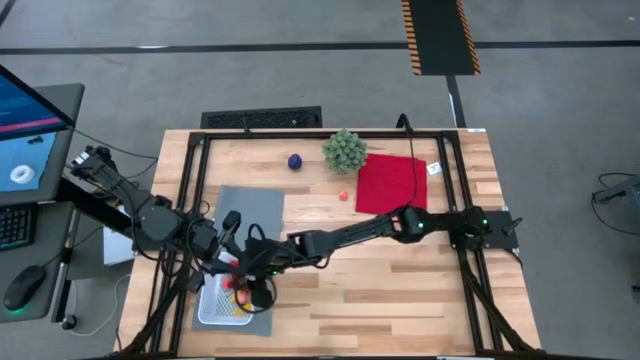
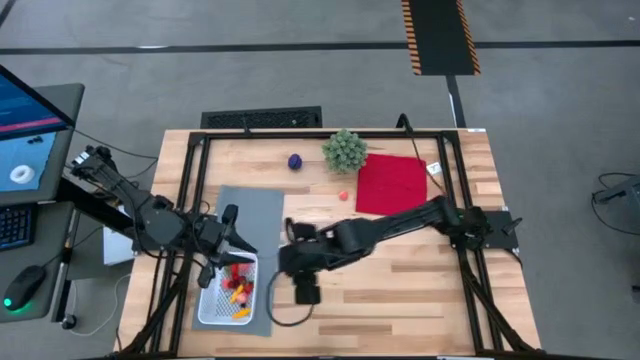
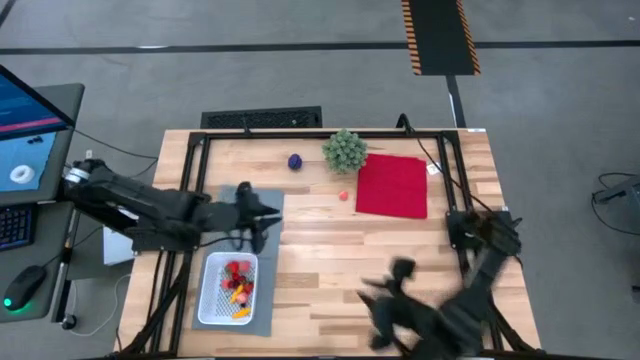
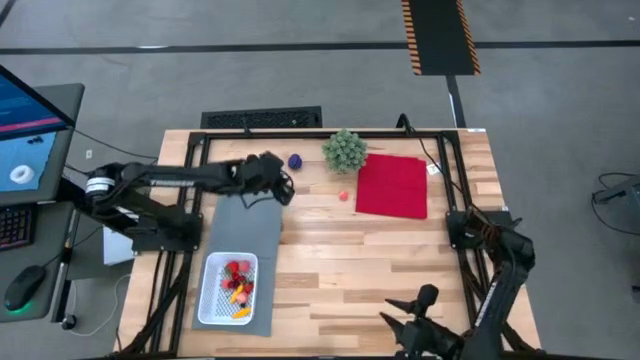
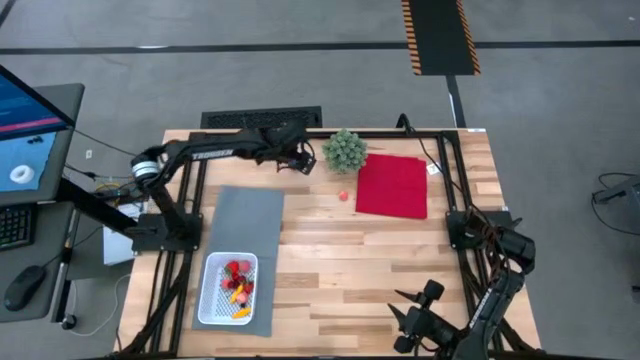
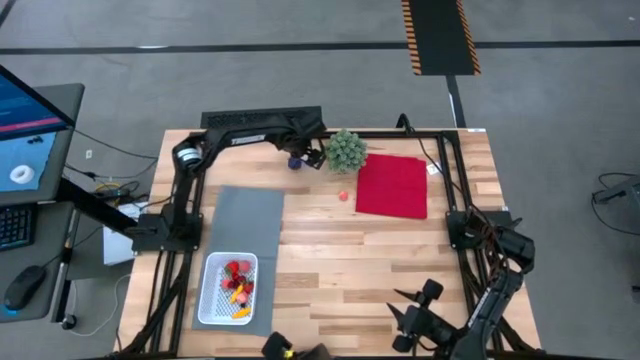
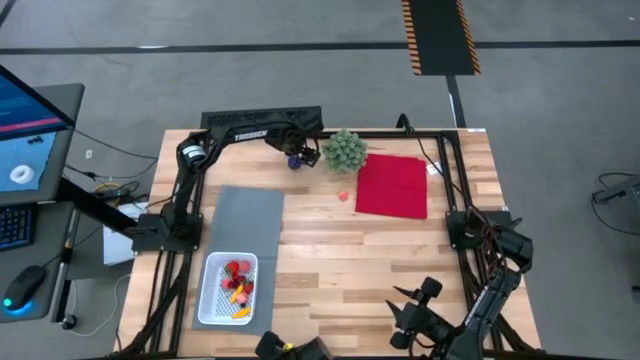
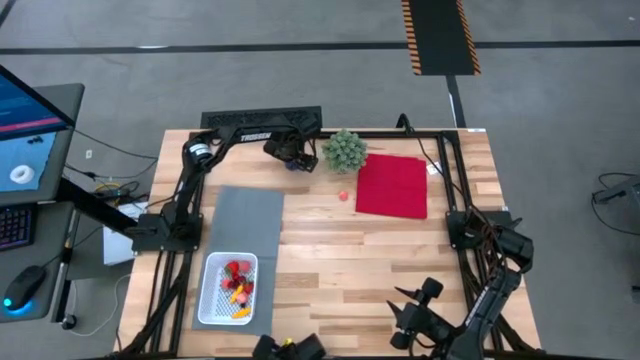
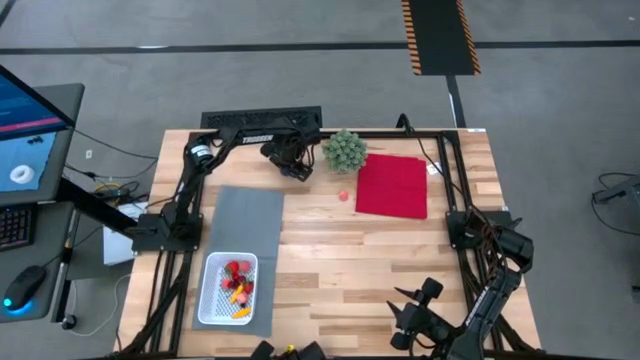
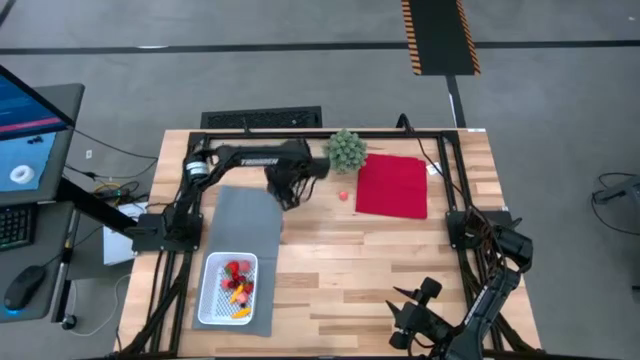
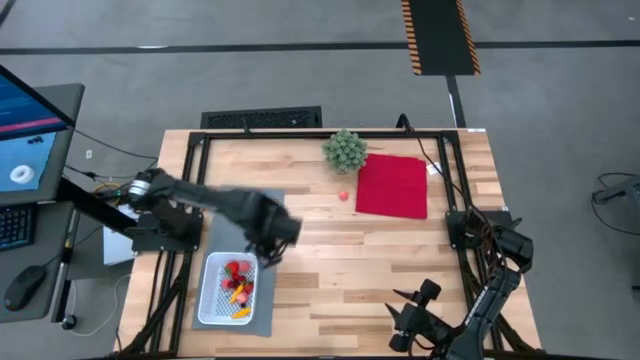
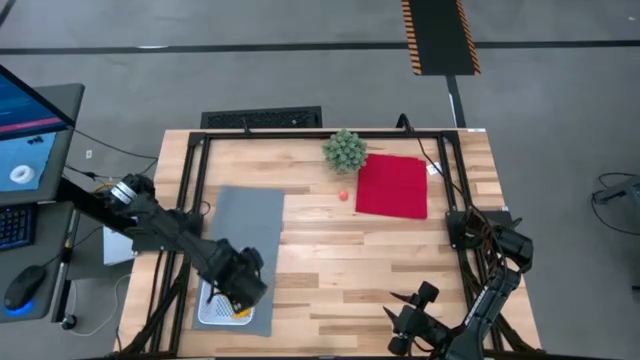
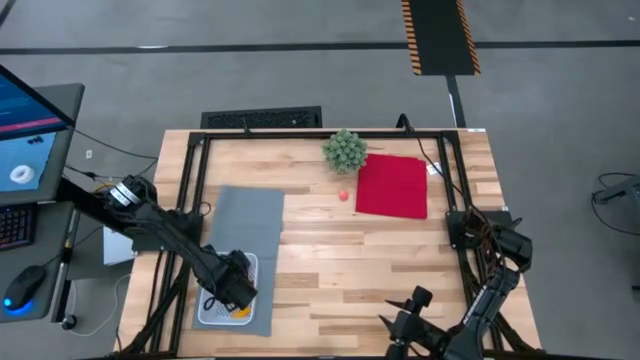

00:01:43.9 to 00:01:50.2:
Task: Pick and placing Produce into tupperware
Put the violet grape into the white basket

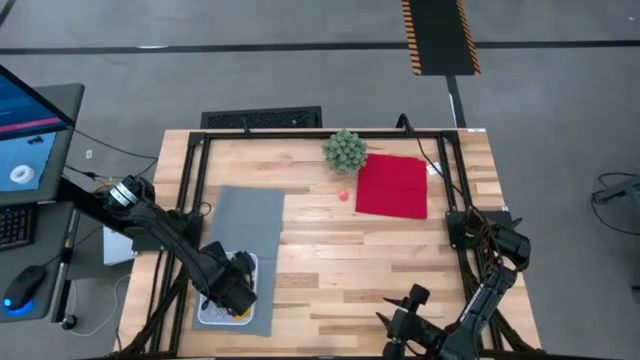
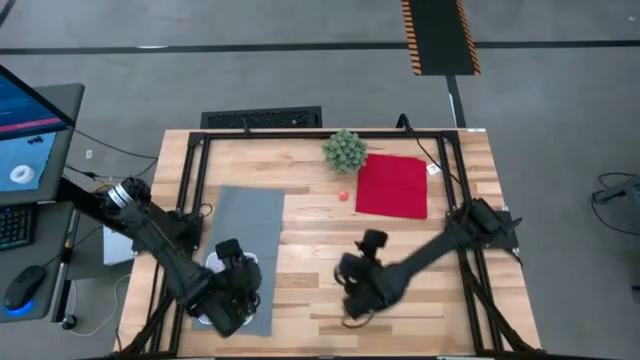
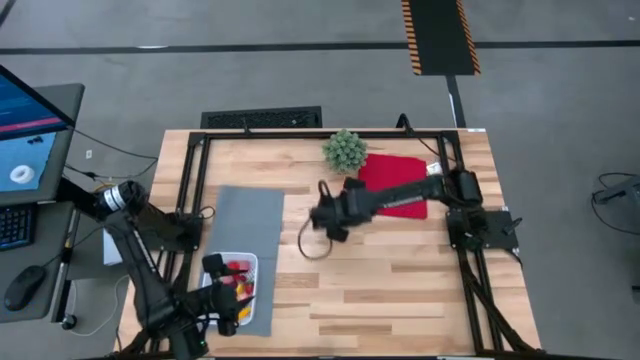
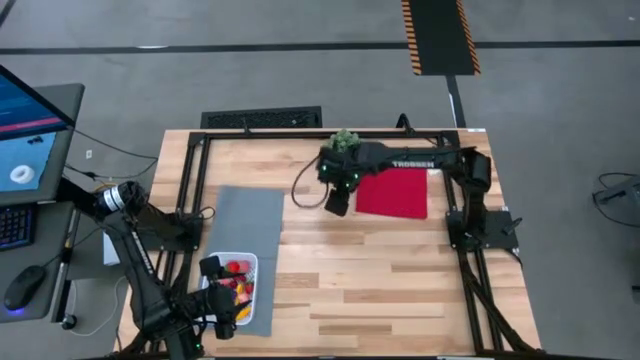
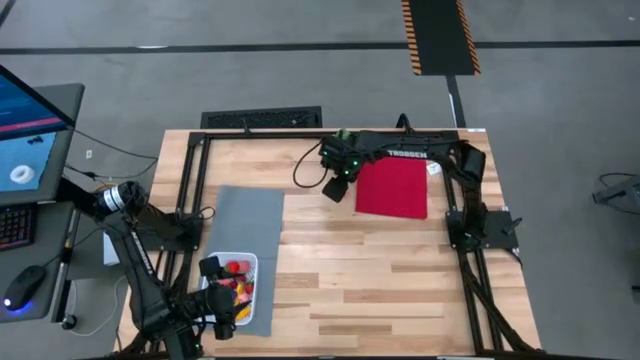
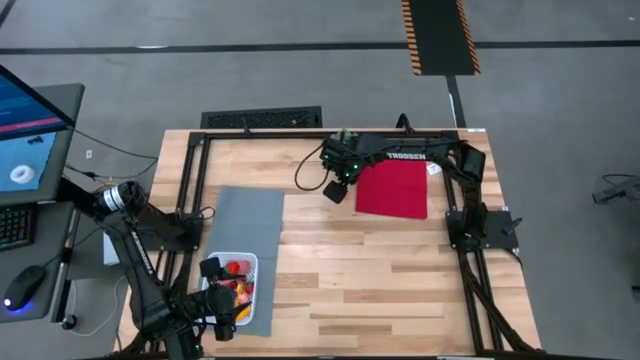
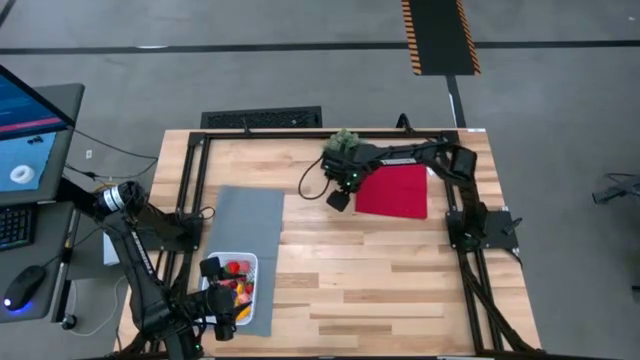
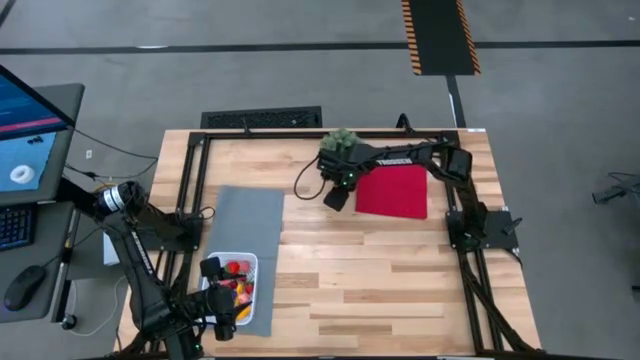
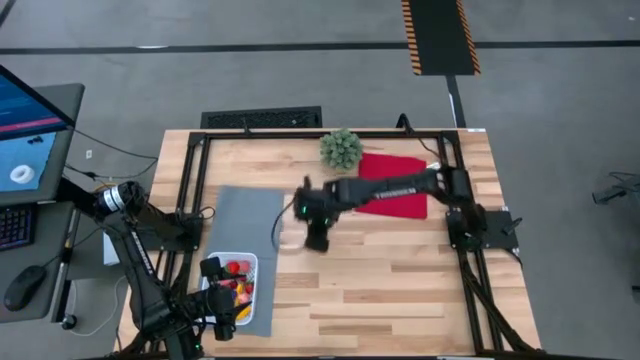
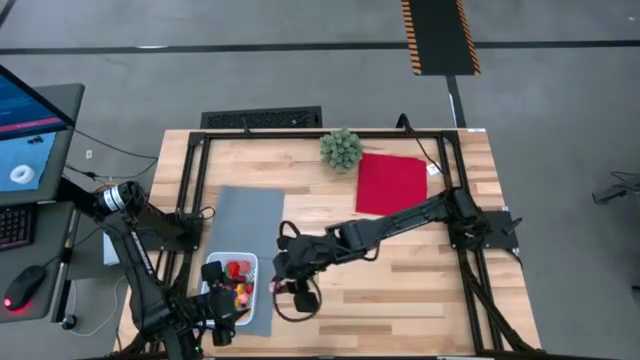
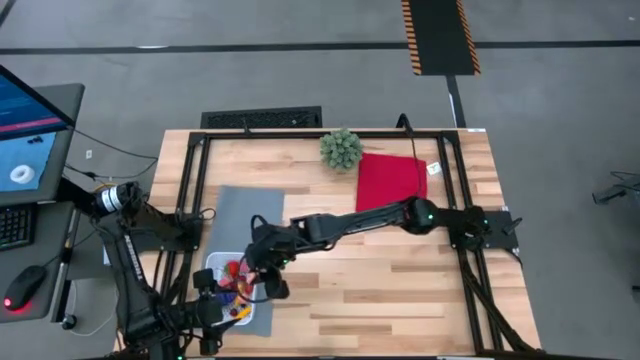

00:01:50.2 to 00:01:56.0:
Put the pink apricot into the white basket

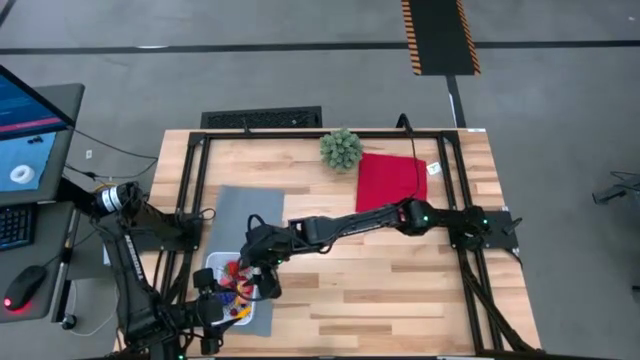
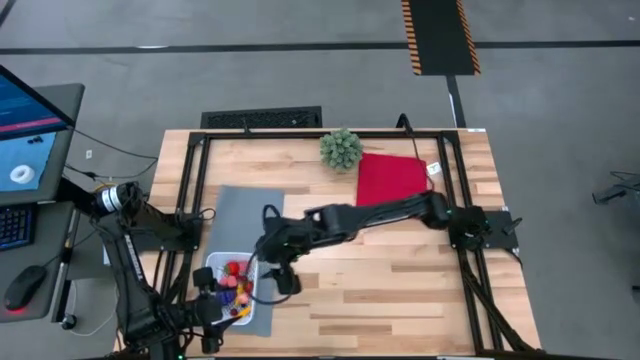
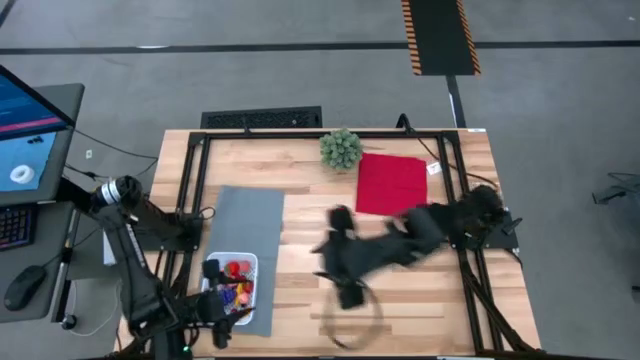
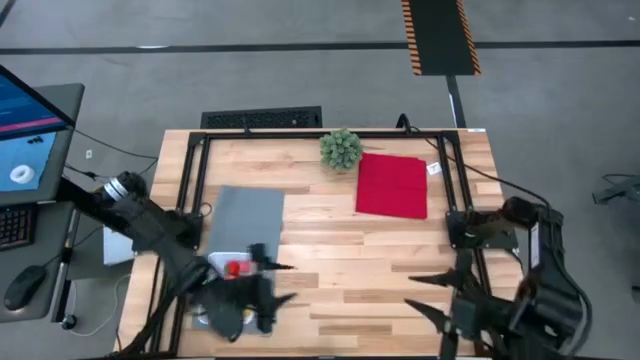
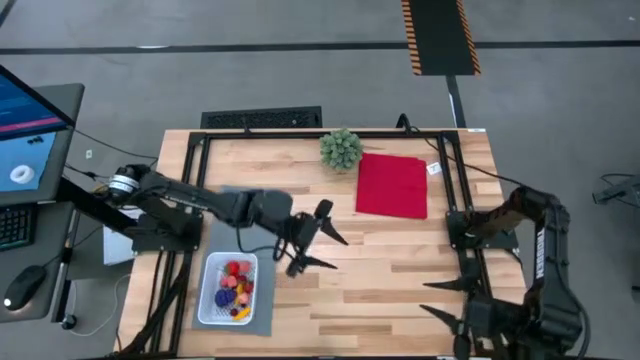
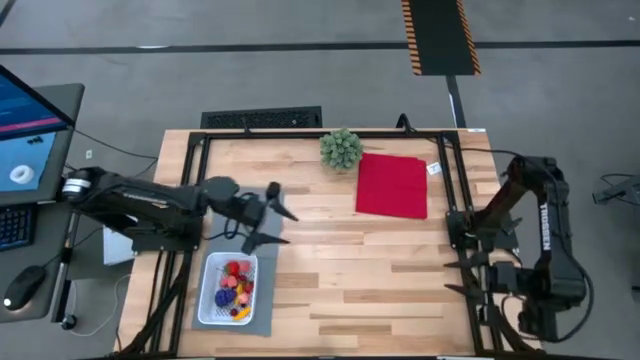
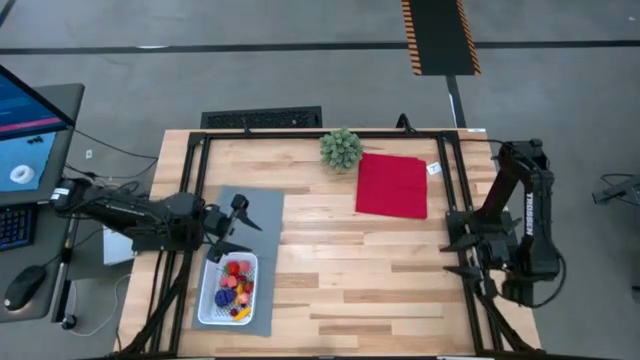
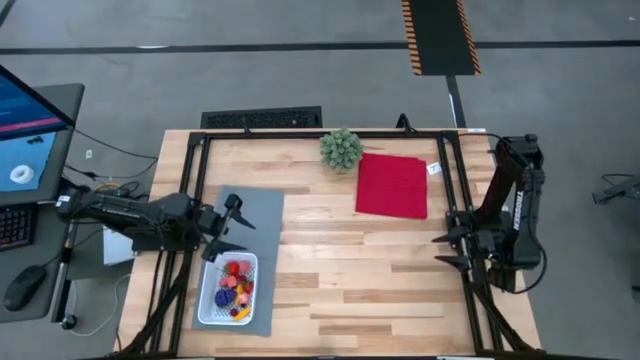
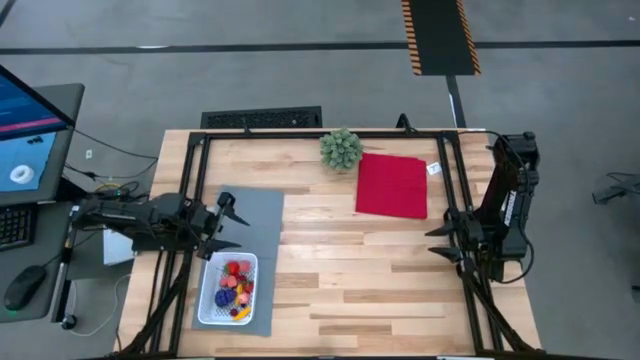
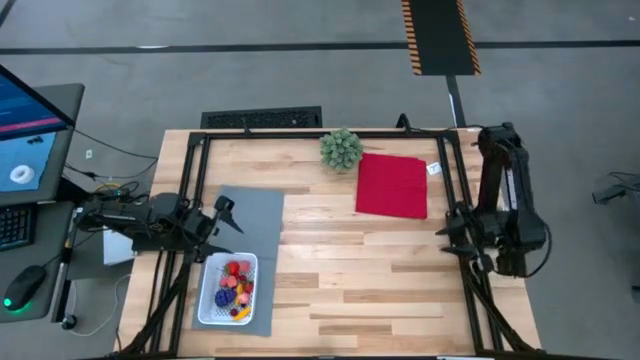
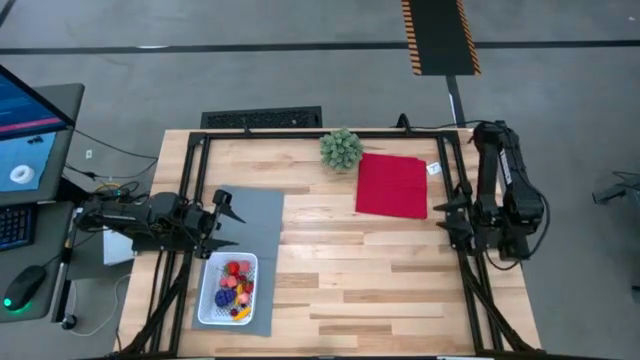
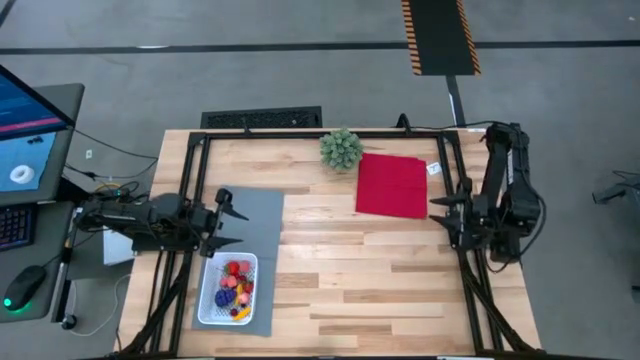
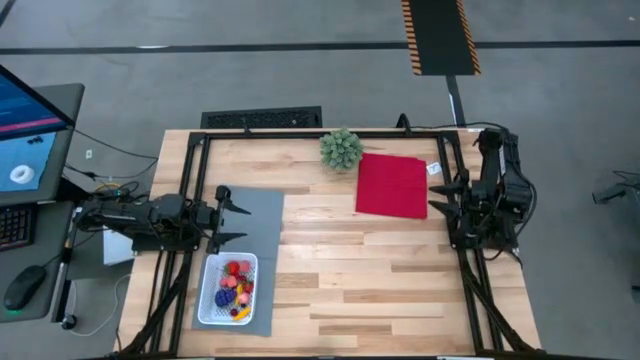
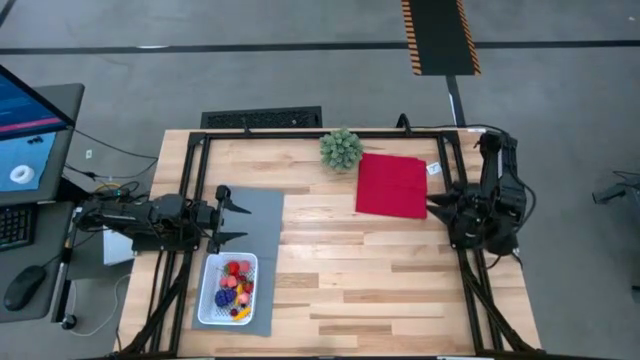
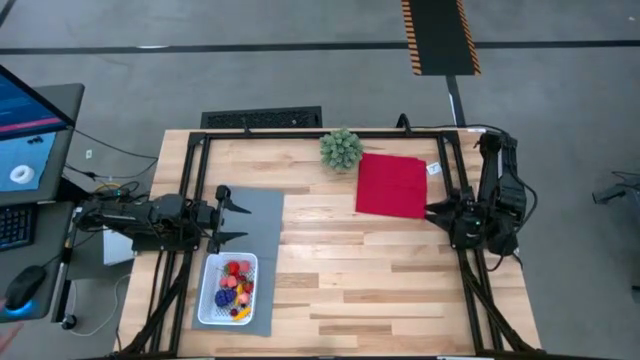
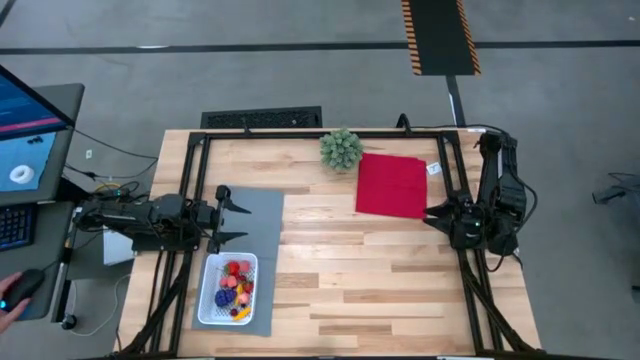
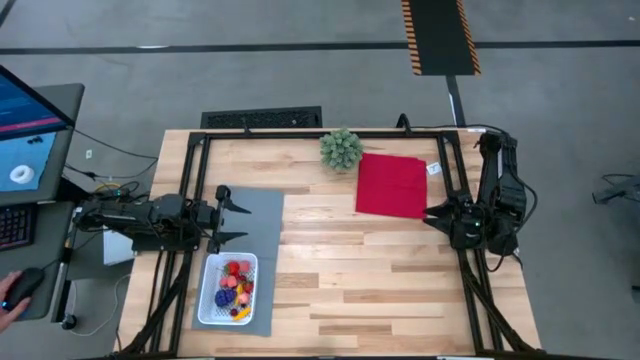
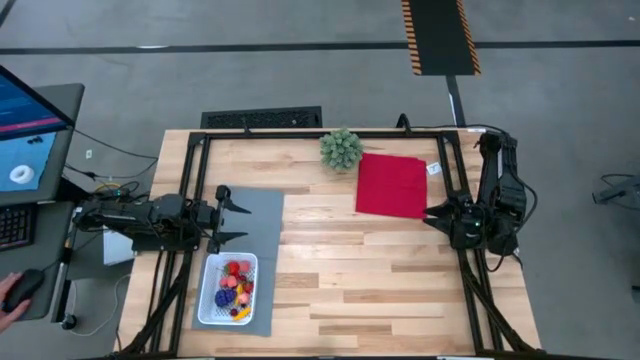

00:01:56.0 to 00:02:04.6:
Return to Home Position

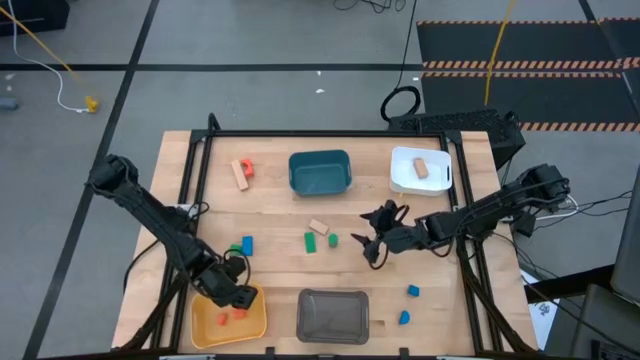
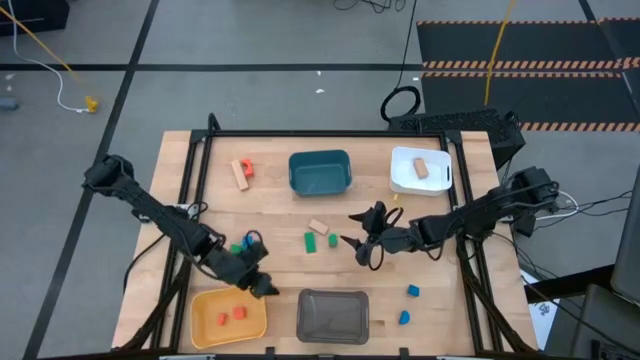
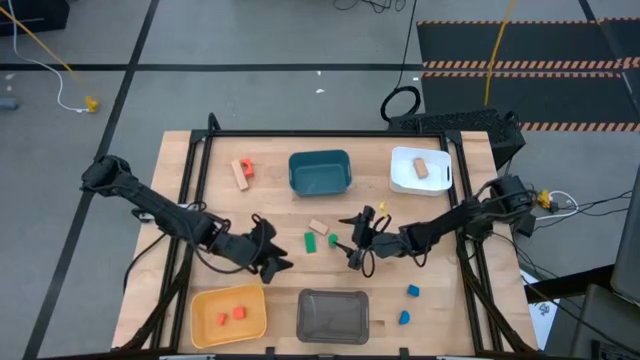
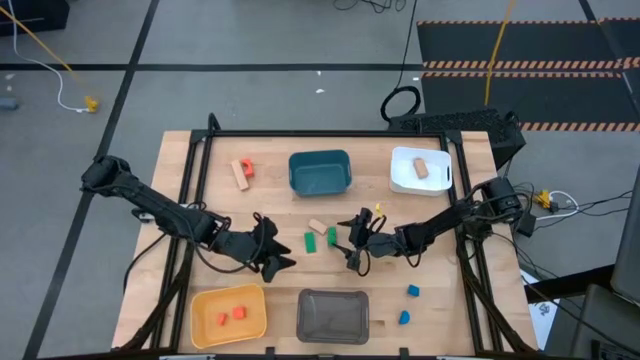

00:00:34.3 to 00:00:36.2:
Task: Sort & place blocks by color
Put the right green block into the blue bin
